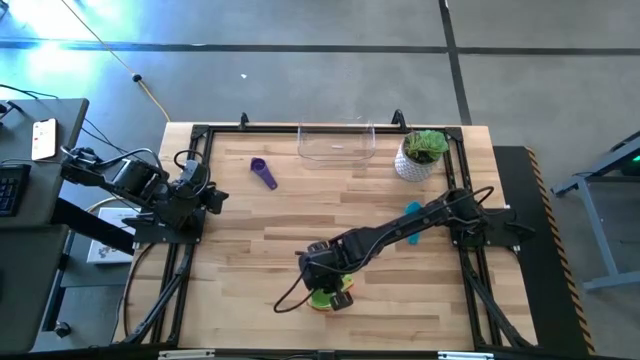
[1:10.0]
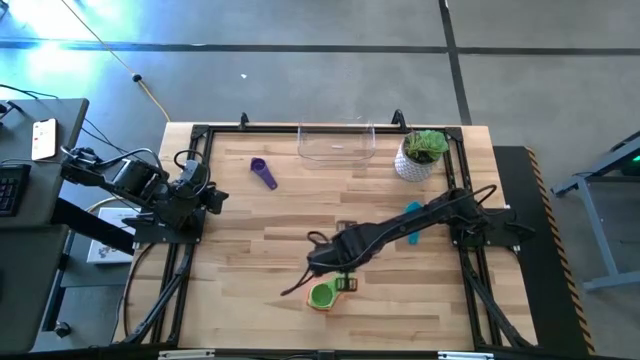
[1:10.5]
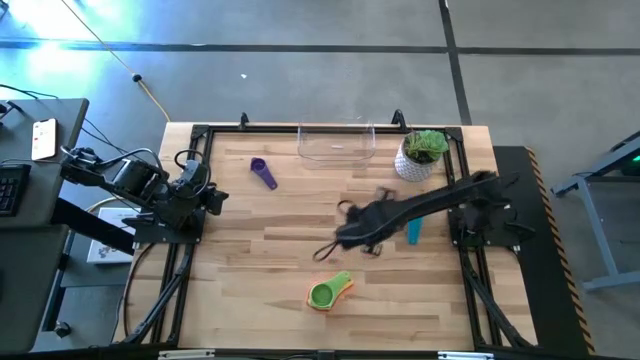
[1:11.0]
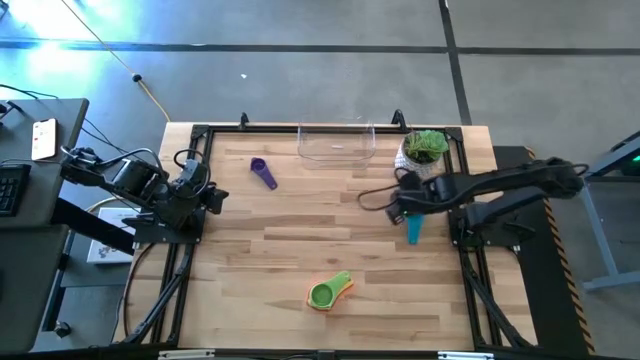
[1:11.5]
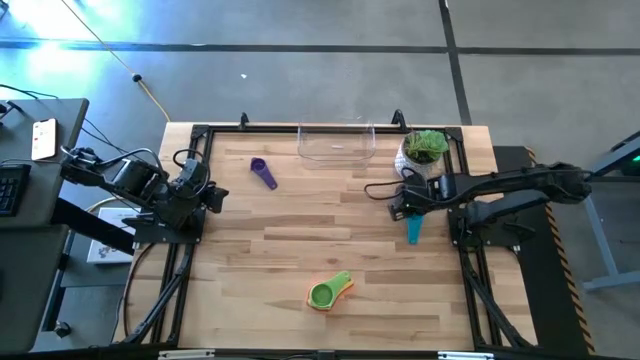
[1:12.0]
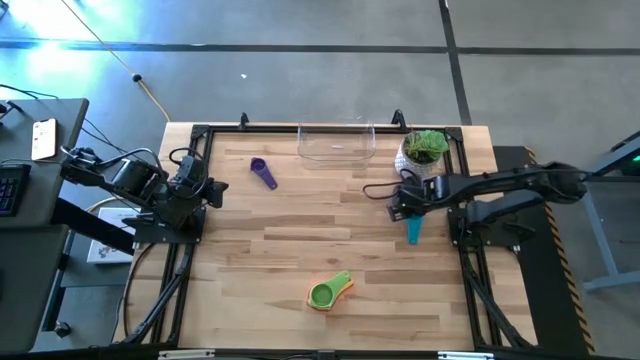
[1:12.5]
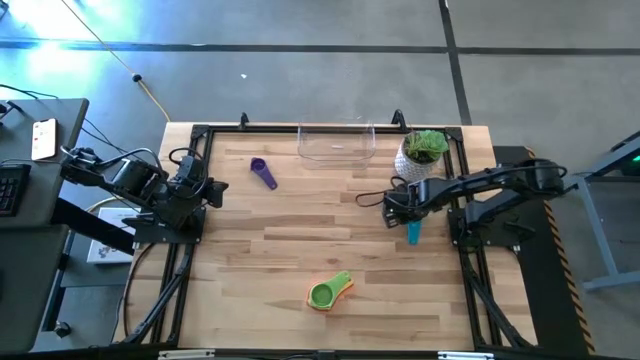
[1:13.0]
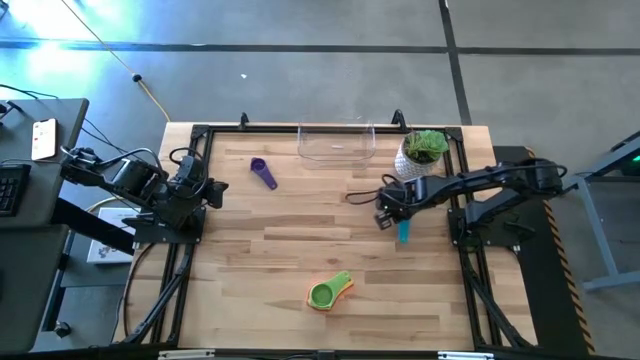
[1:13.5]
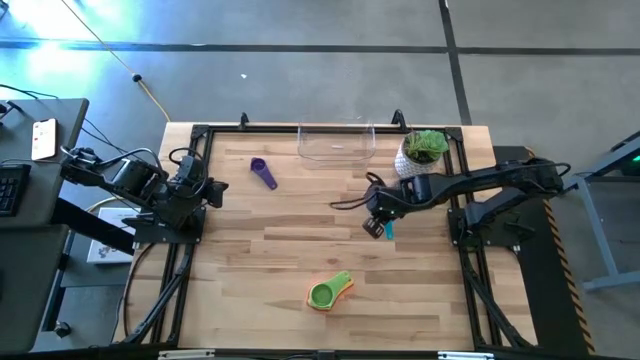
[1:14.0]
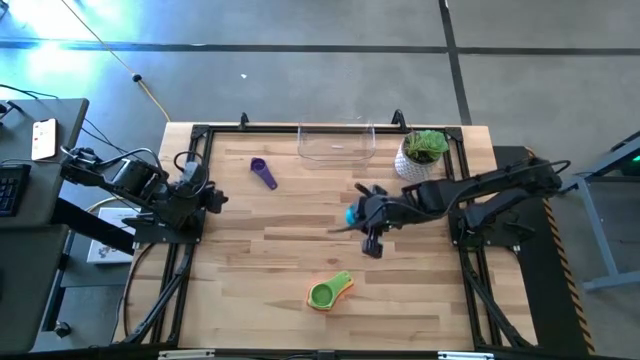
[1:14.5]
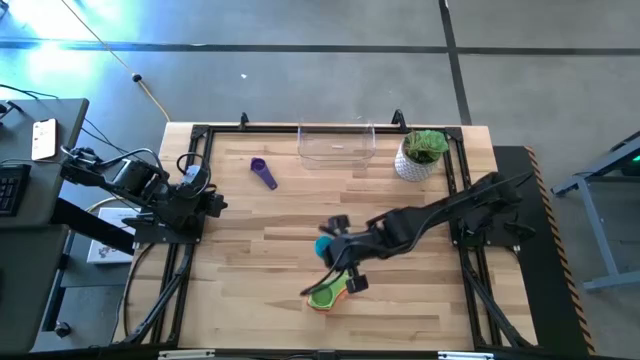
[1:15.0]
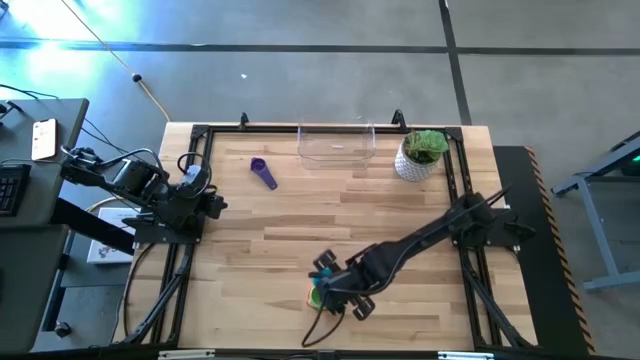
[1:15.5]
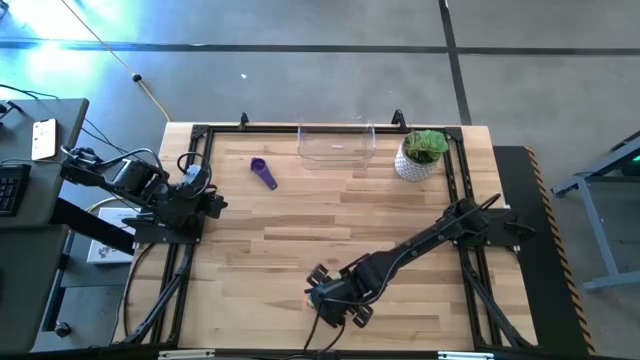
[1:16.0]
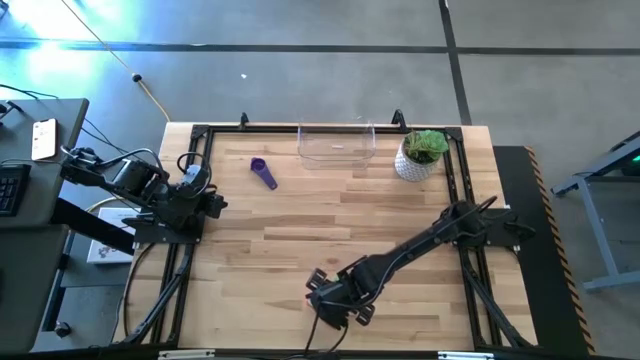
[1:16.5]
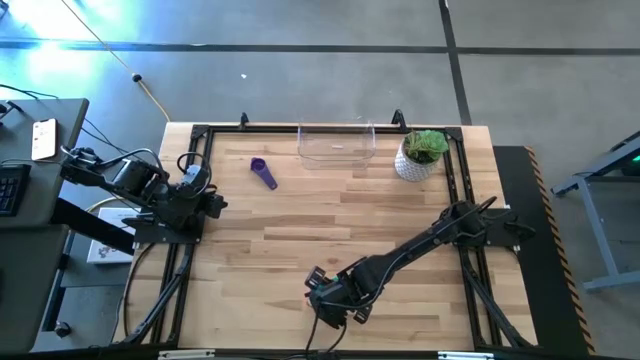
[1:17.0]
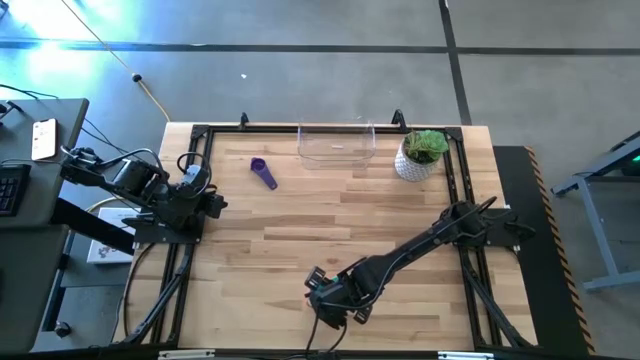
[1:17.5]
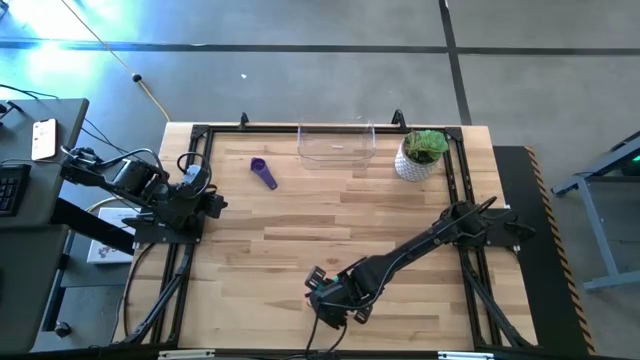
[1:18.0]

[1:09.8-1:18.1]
Task: Nest measuring cups in basket
Stack the light blue measuring cup on top of the green measuring cup

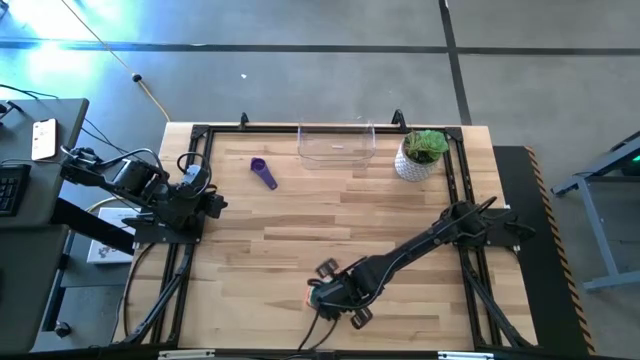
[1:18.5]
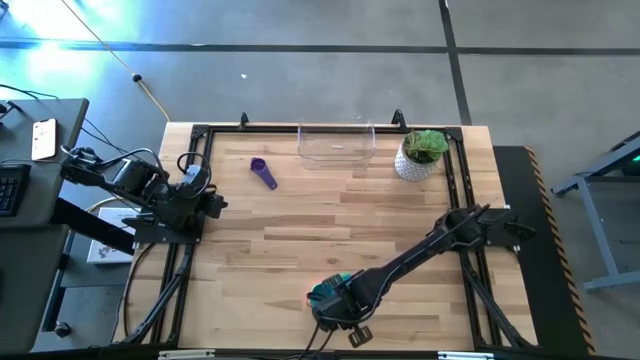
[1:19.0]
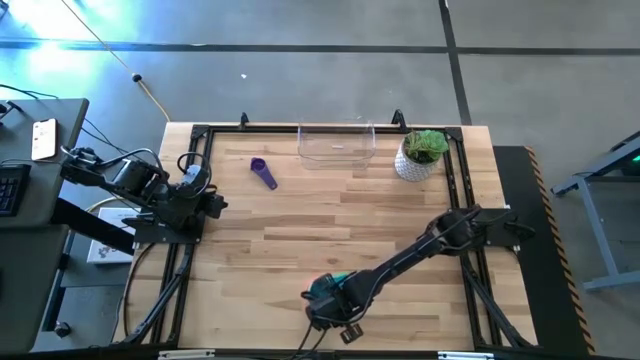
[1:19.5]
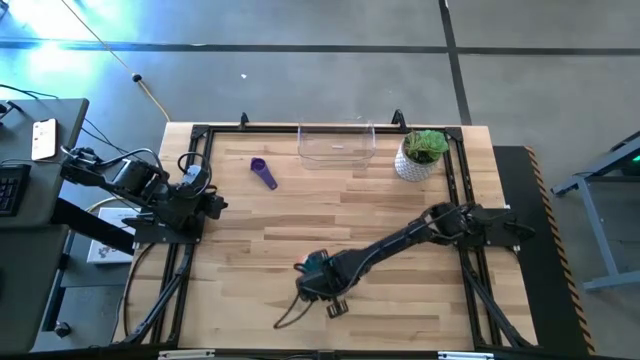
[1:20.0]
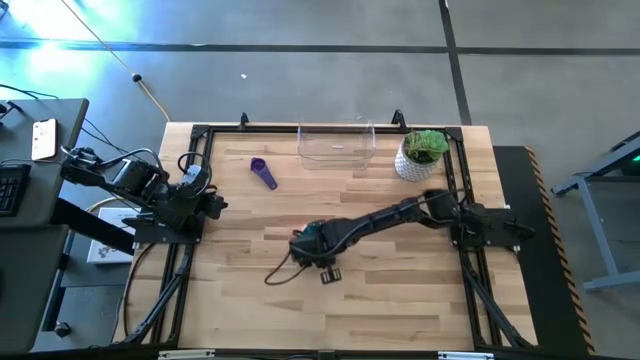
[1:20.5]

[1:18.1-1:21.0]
Move the stacked measuring cups to the center of the table

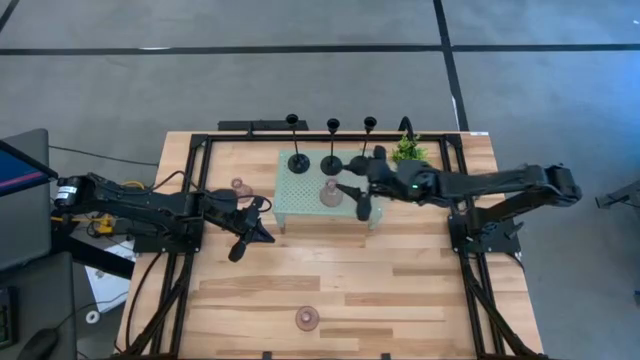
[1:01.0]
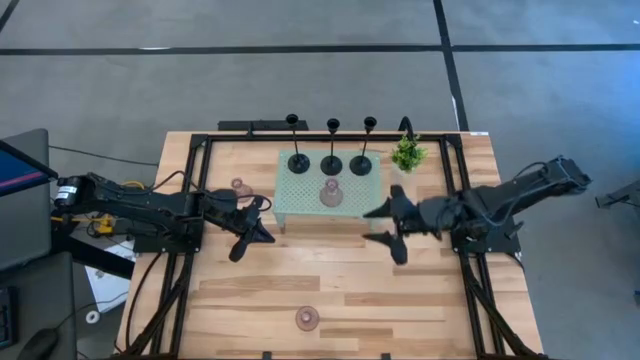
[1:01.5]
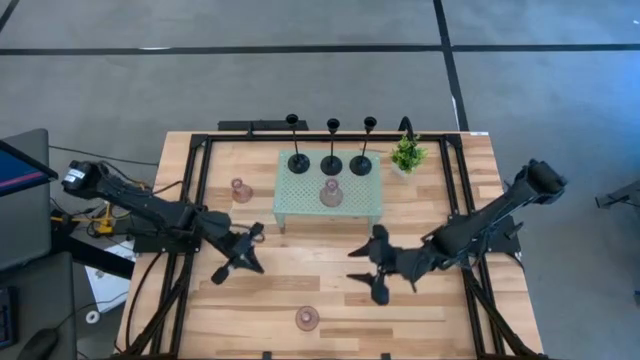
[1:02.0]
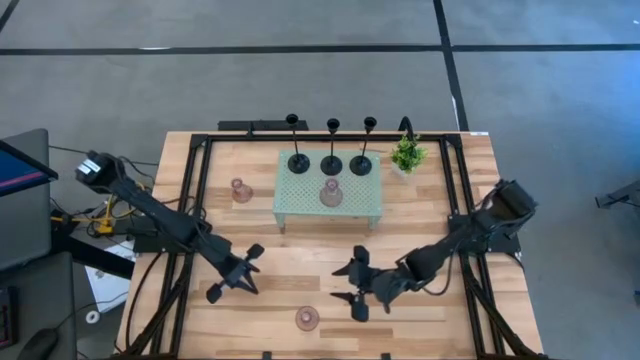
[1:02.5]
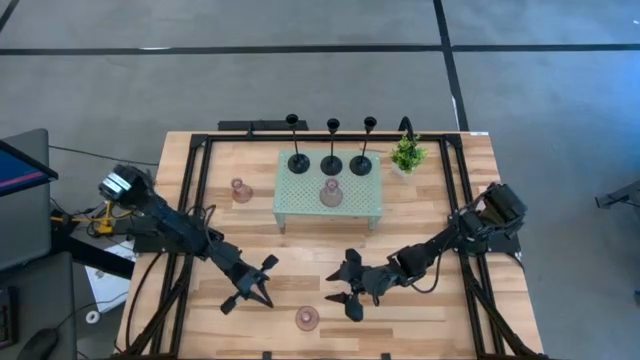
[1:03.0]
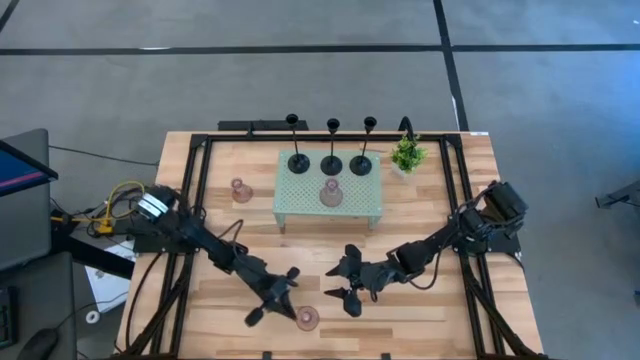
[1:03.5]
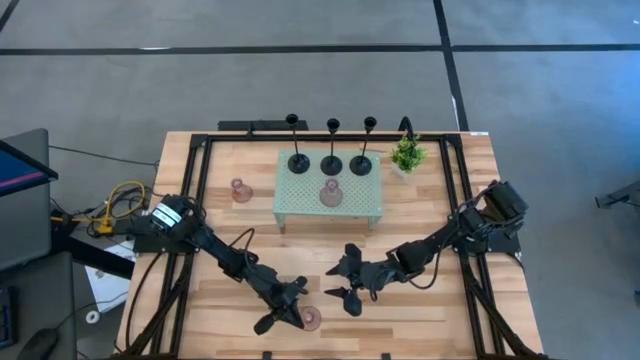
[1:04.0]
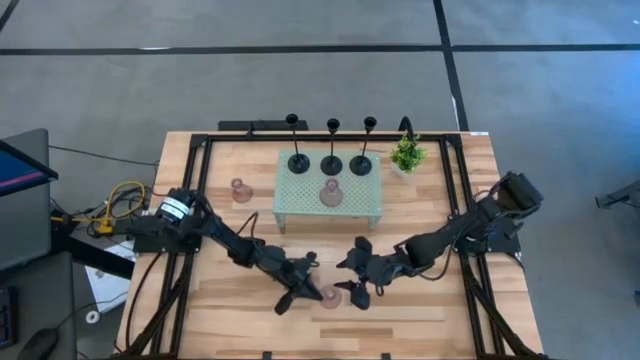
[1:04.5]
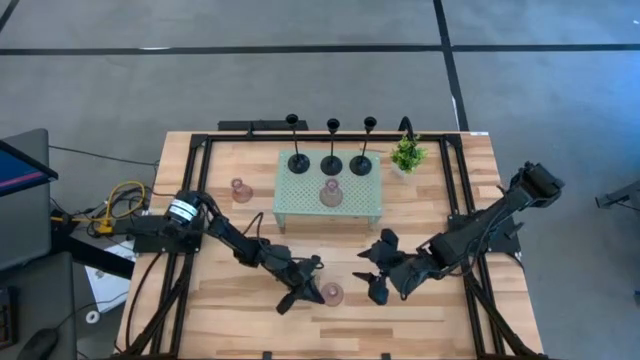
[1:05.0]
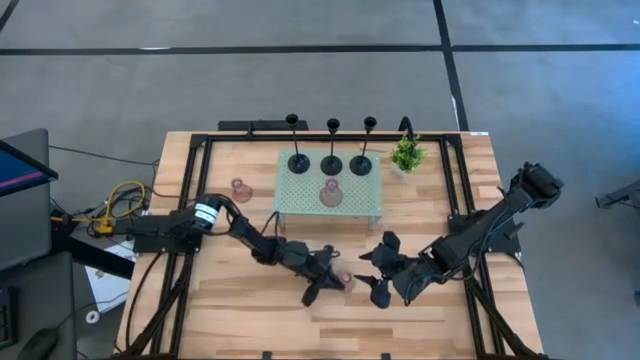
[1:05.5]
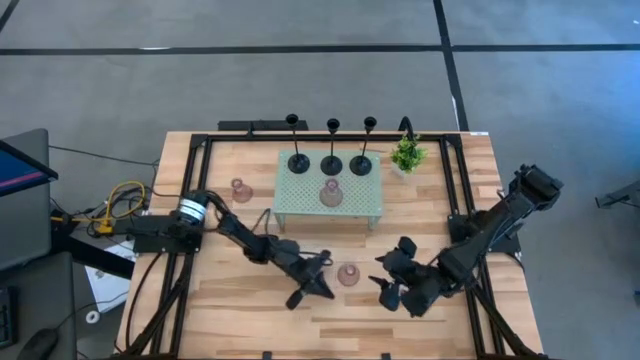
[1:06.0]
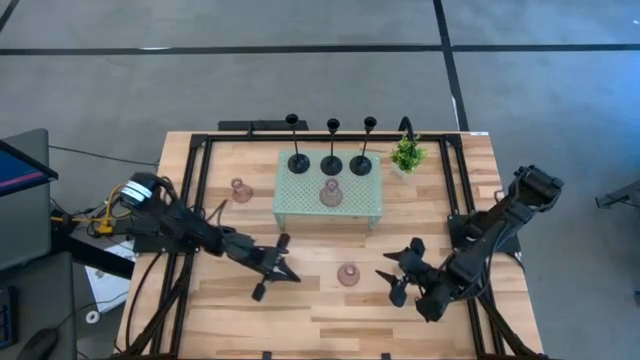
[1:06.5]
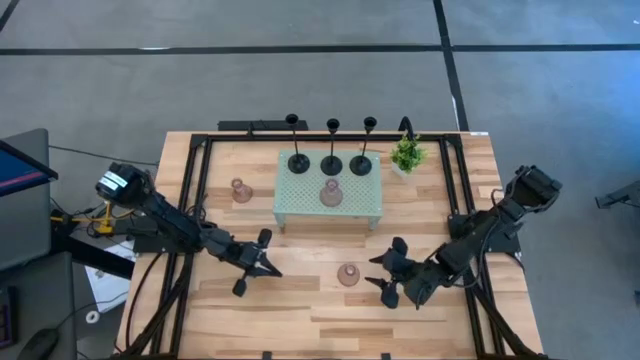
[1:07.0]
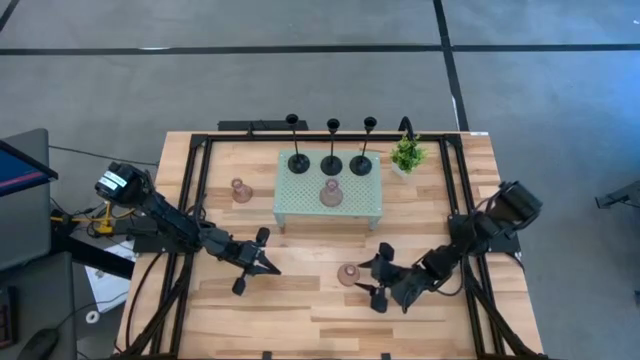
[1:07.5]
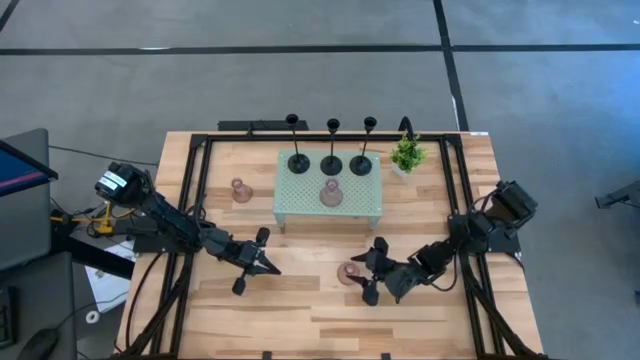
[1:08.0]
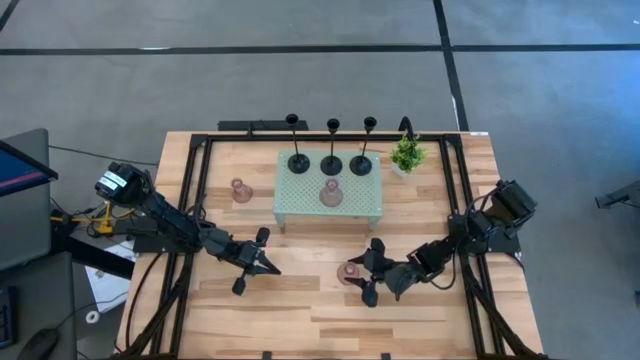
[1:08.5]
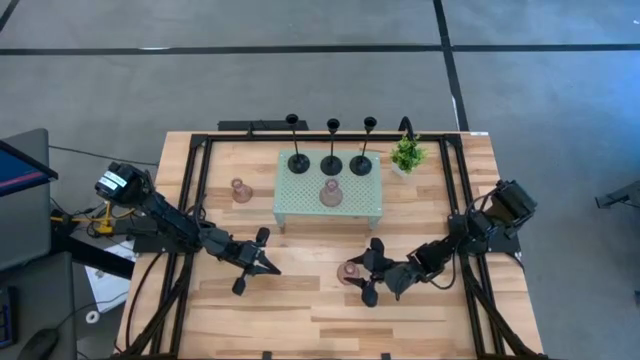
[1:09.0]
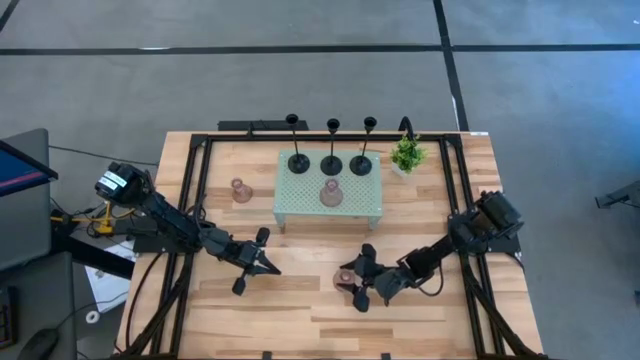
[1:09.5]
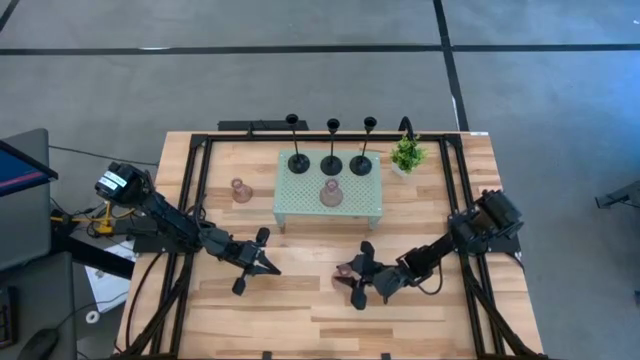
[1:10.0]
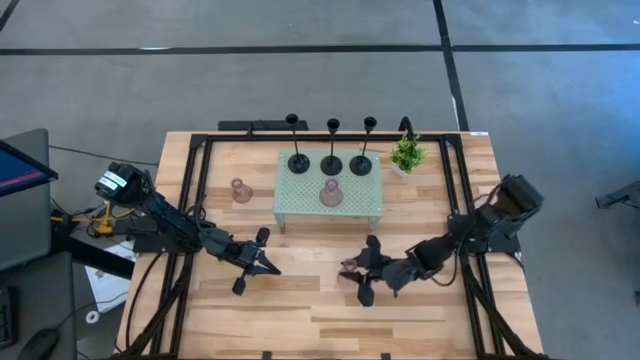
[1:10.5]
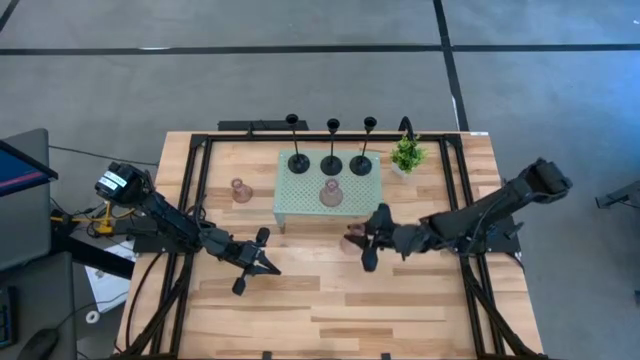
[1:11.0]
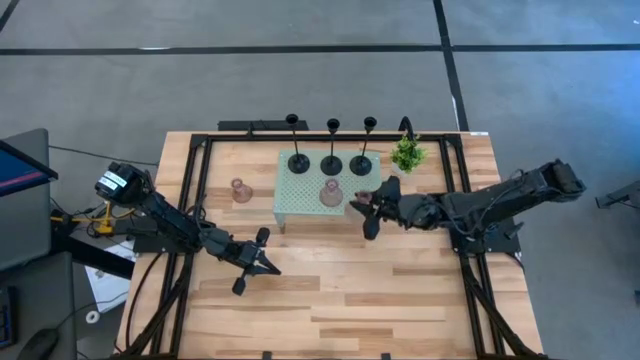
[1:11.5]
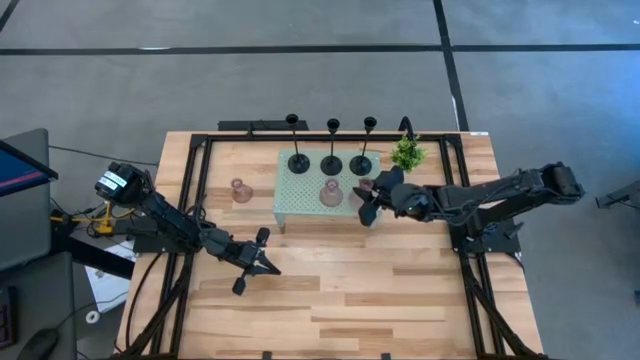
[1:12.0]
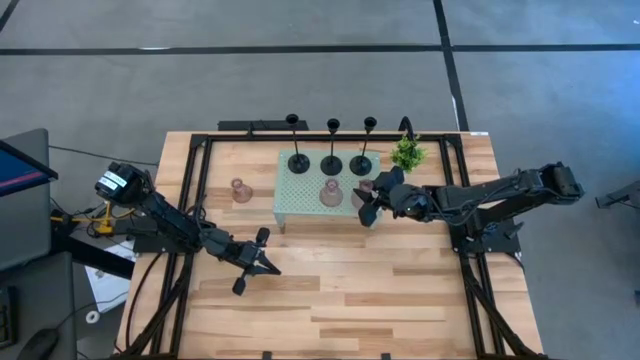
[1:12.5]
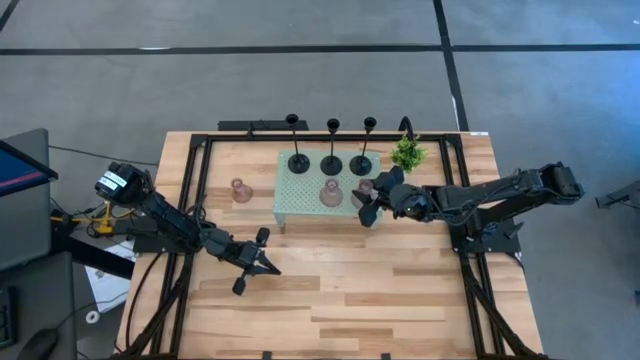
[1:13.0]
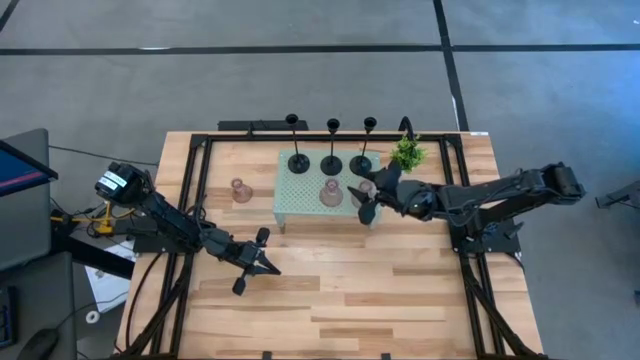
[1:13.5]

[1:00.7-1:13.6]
Task: Pick & Place candle stick holders
Put the bottom glass candle holder on the shelf aligned with the other black candle holder
